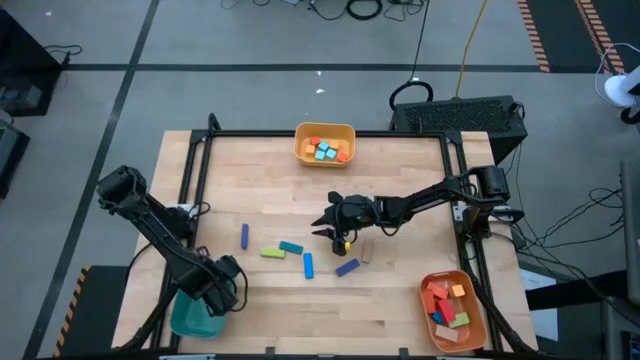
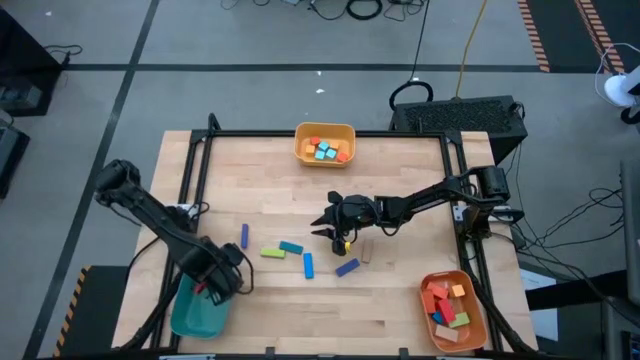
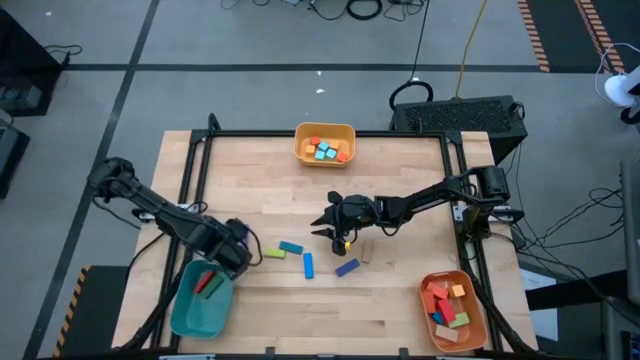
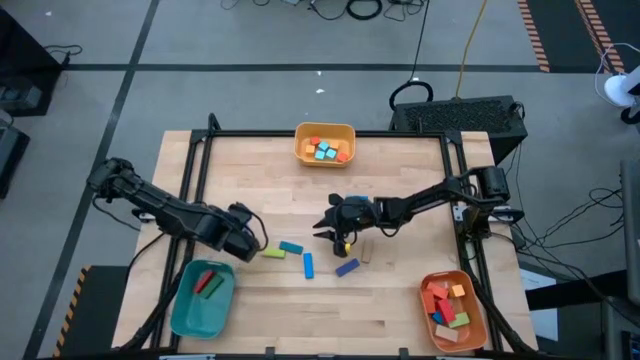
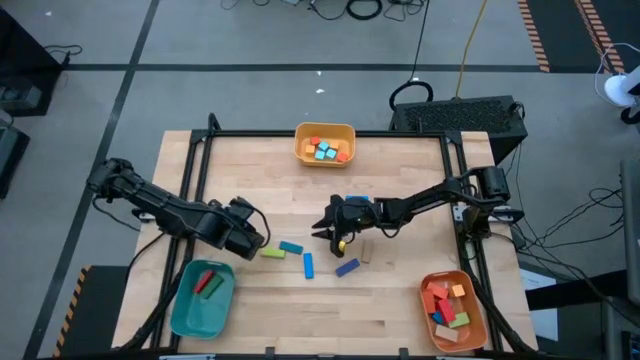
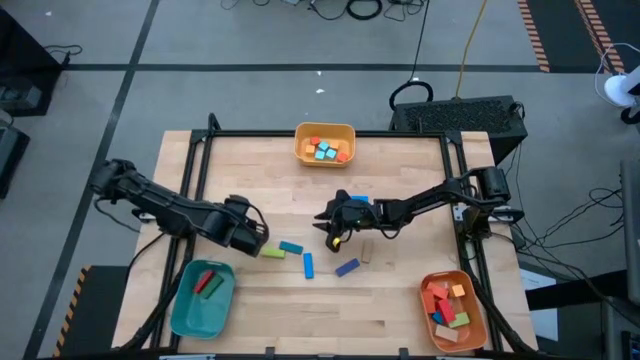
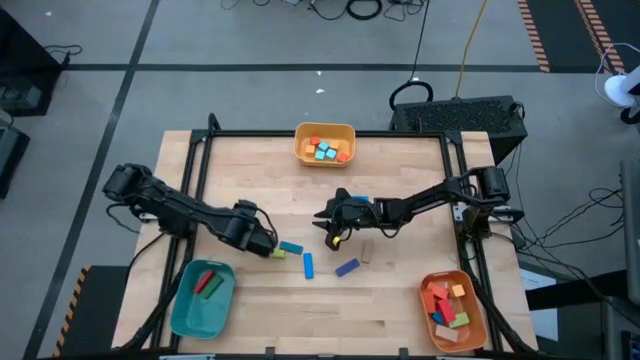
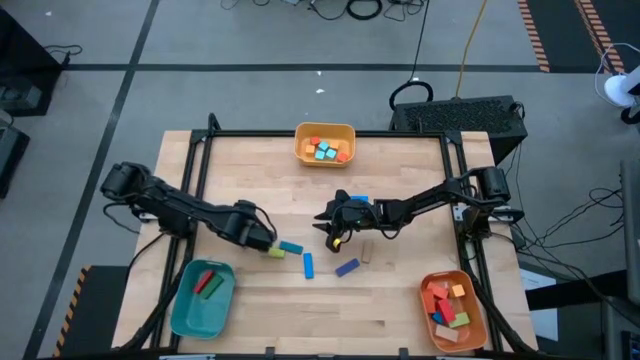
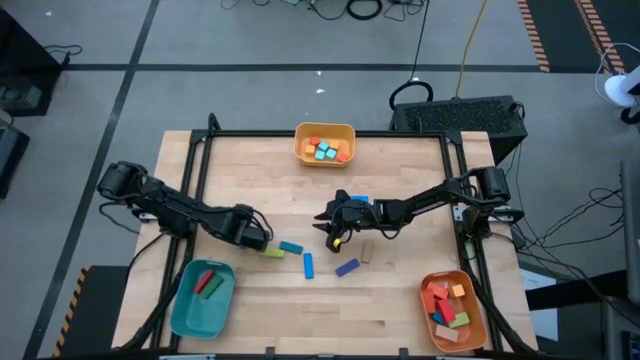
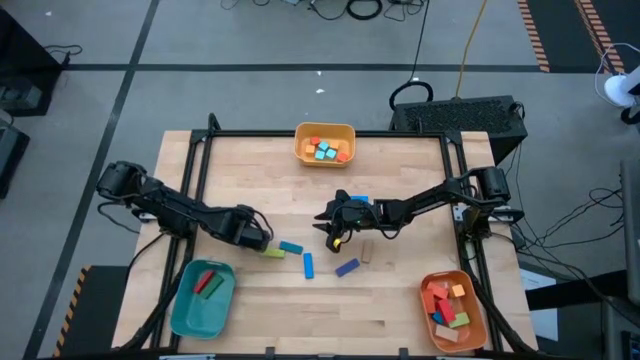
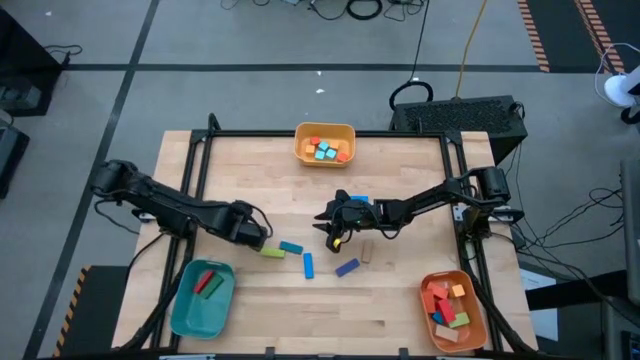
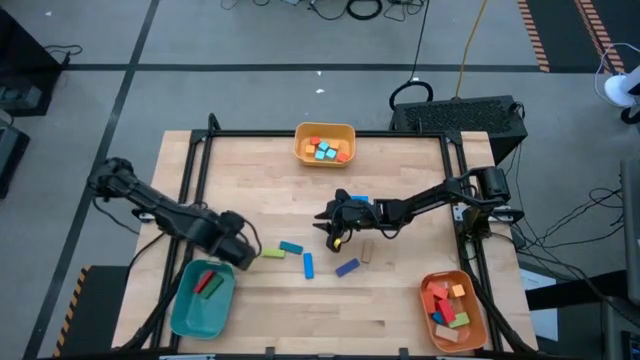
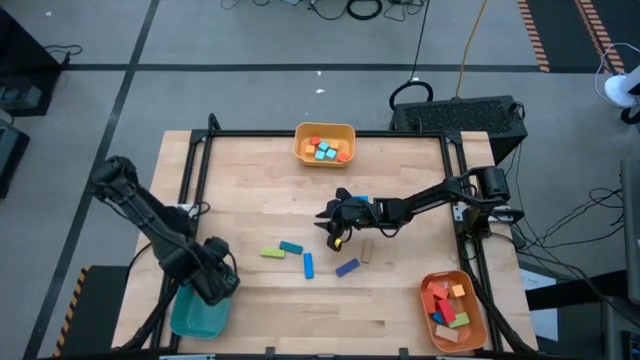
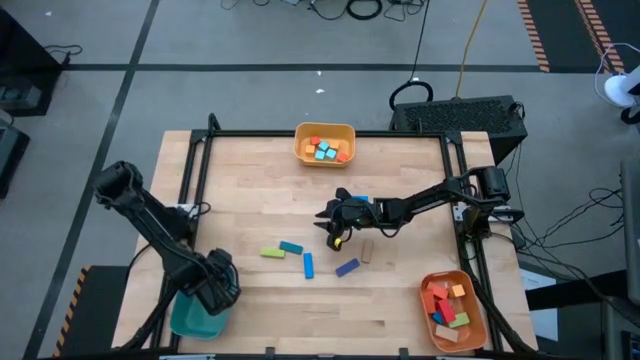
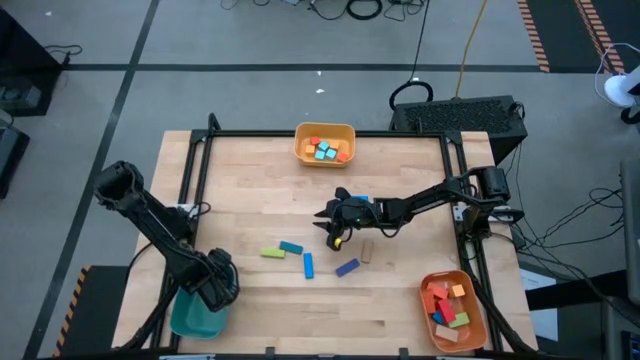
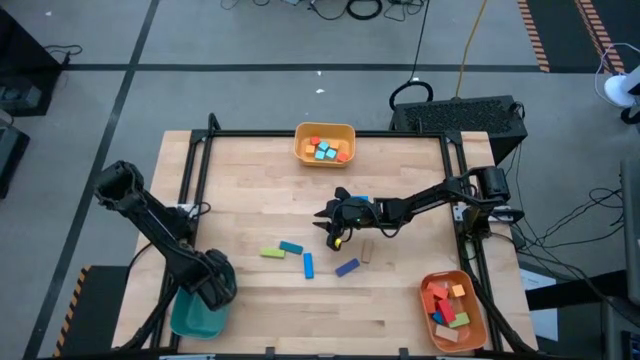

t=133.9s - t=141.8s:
Task: Sort blocks by size
Put the left small violet rectangle block into the green bin

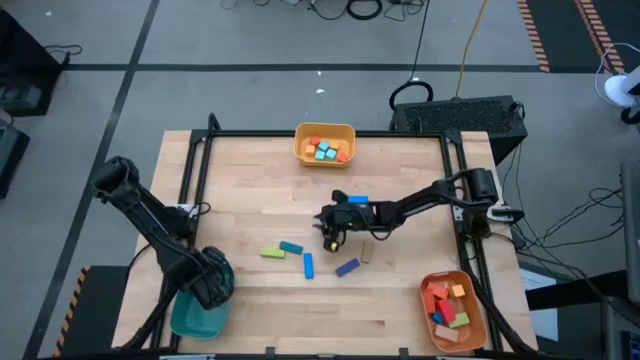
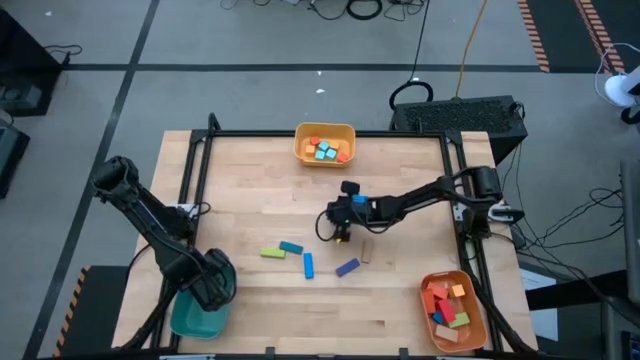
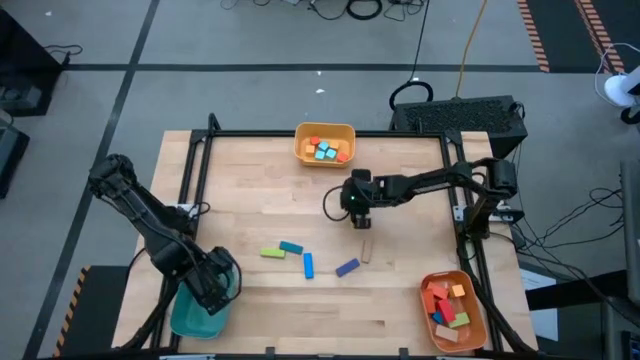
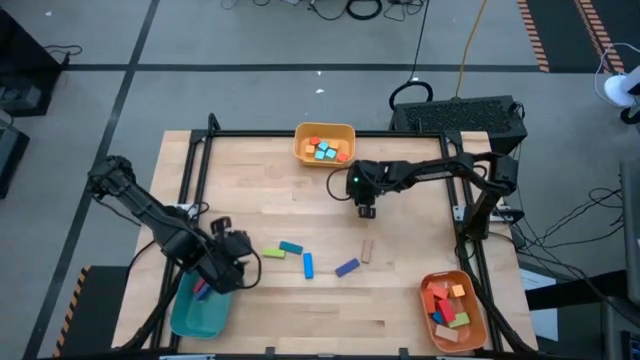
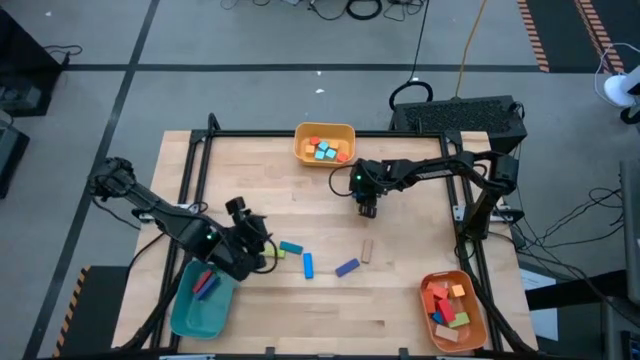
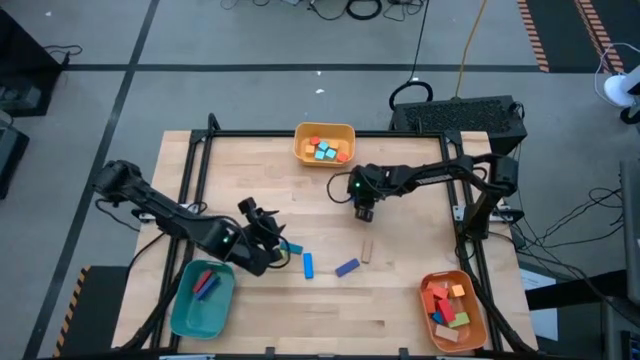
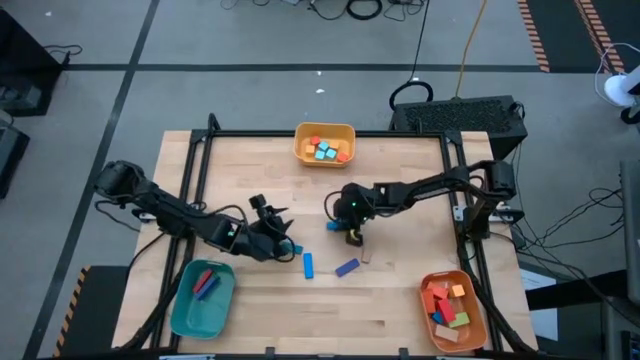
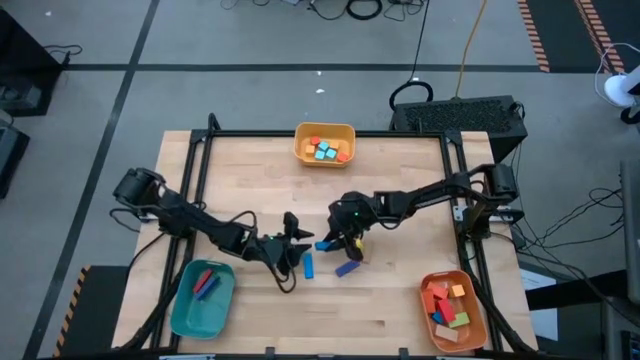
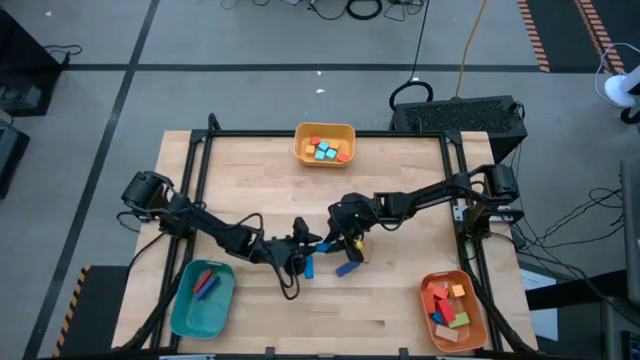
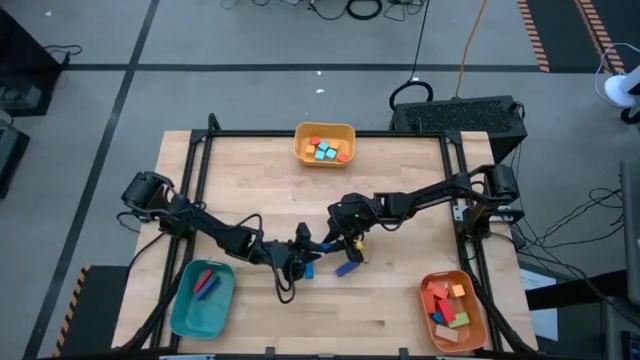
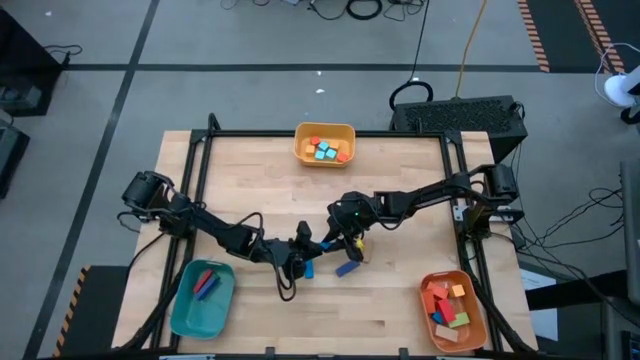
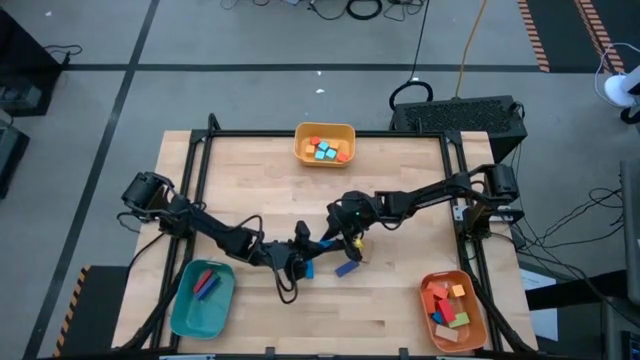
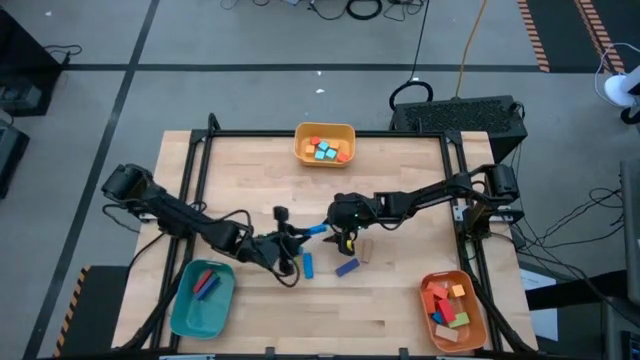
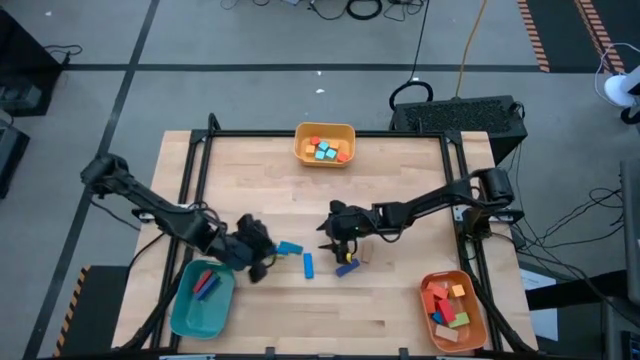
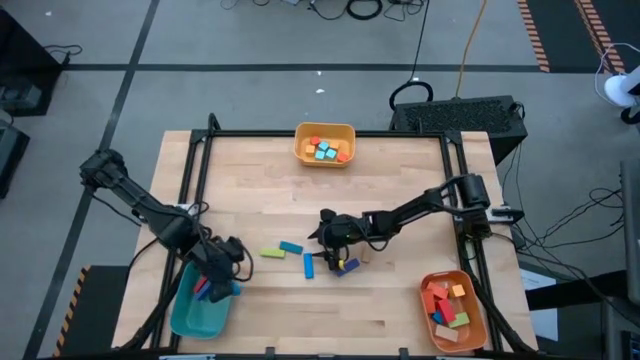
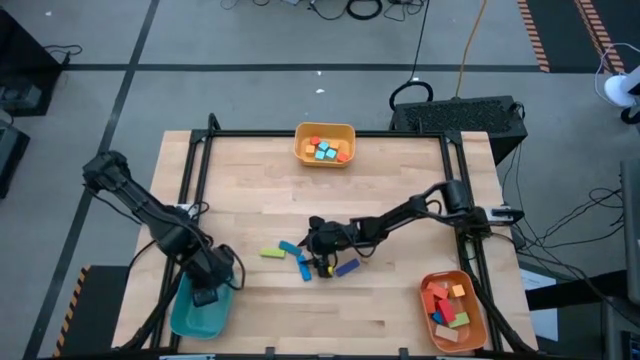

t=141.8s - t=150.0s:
Put the top small blue rectangle block into the green bin

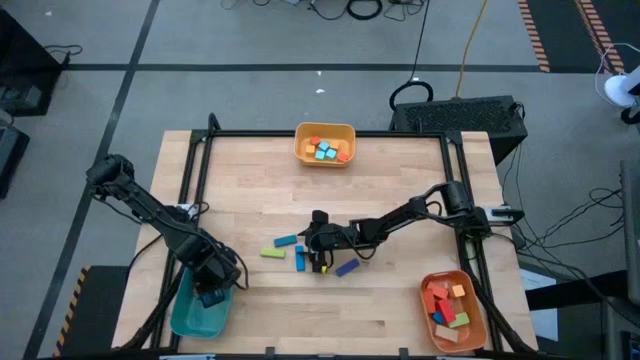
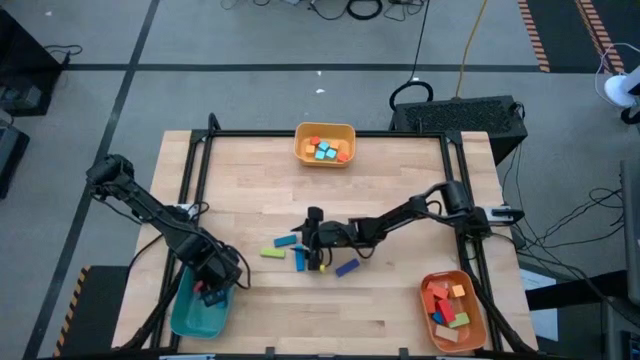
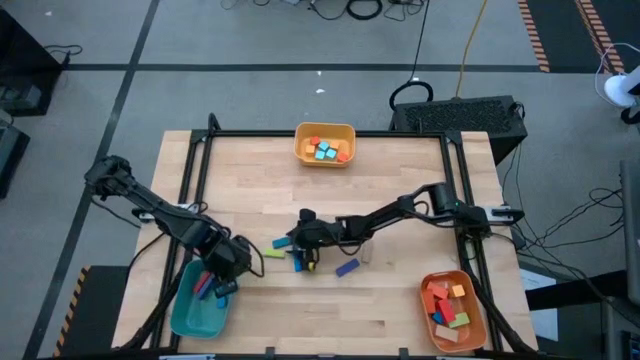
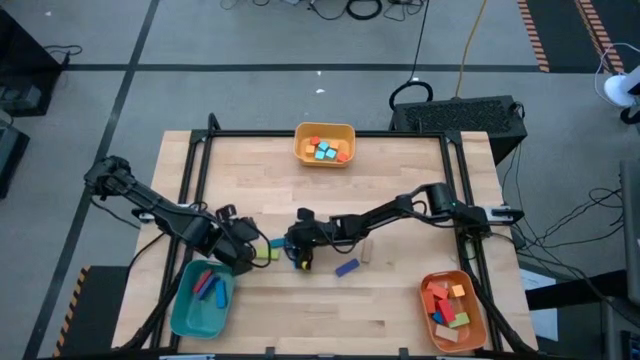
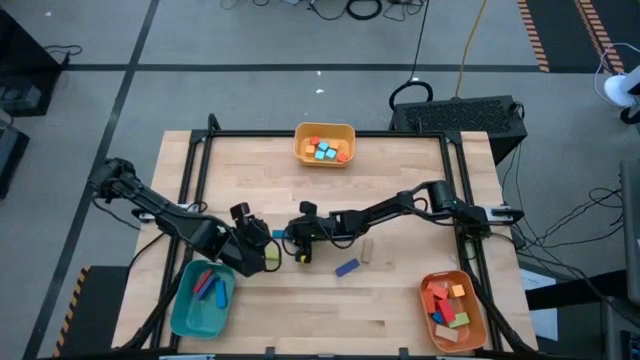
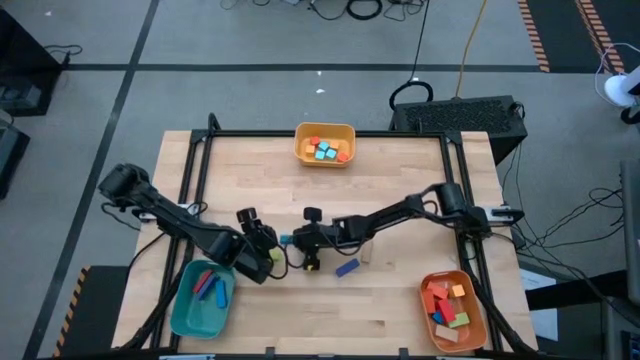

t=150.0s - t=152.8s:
Put the small dark blue rectangle block into the green bin

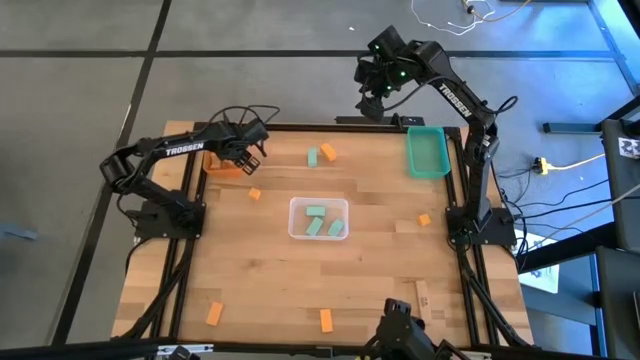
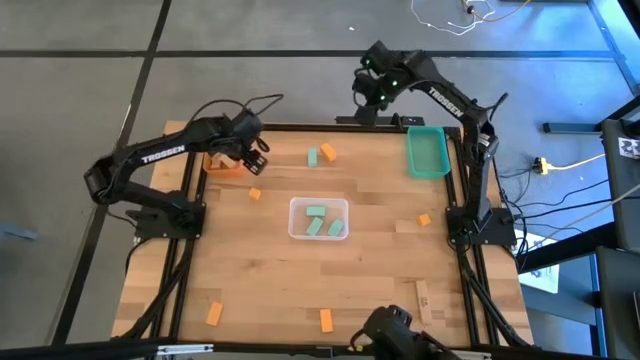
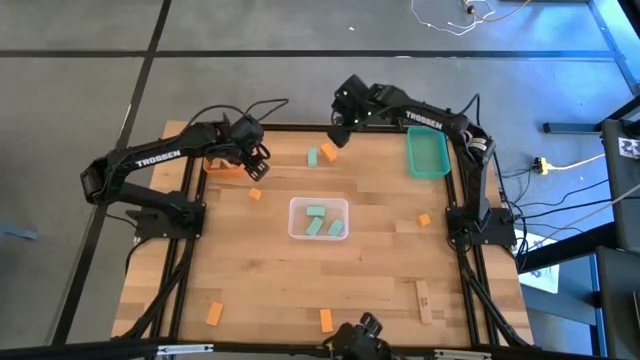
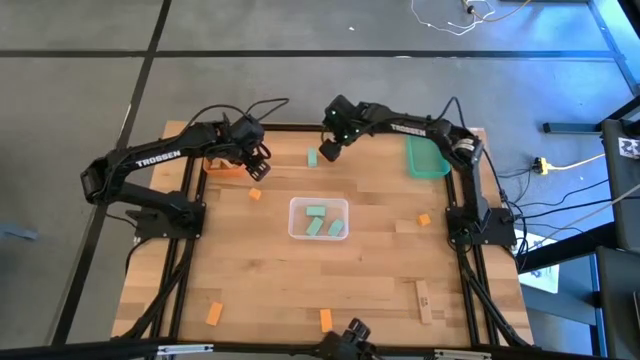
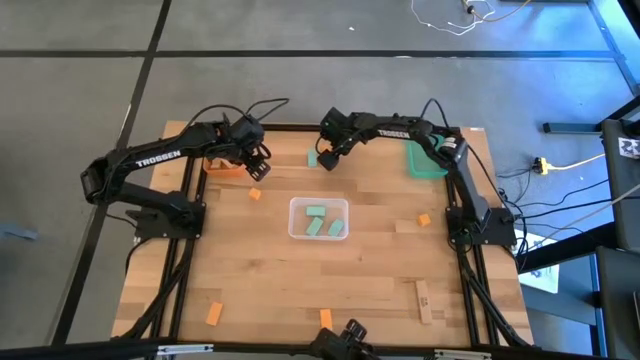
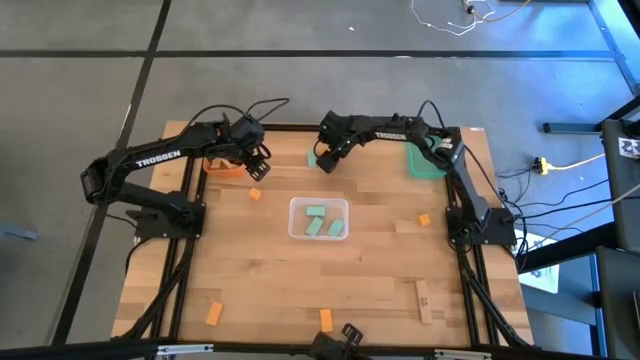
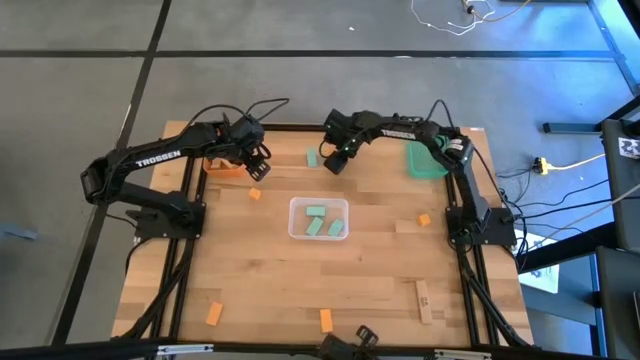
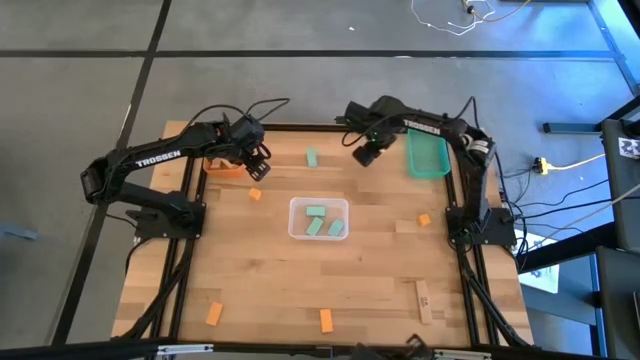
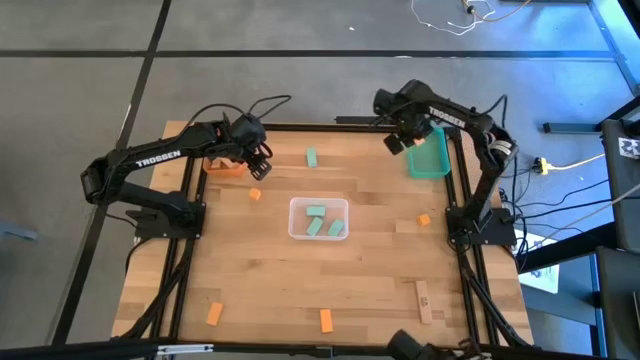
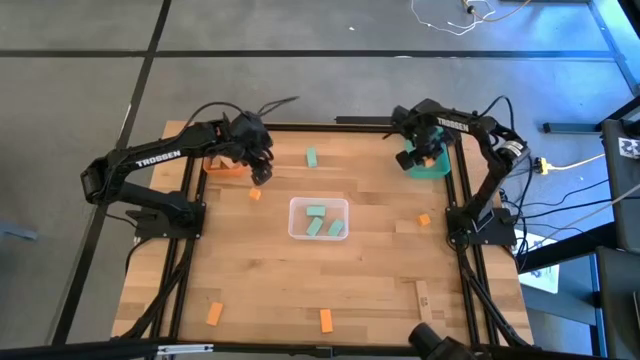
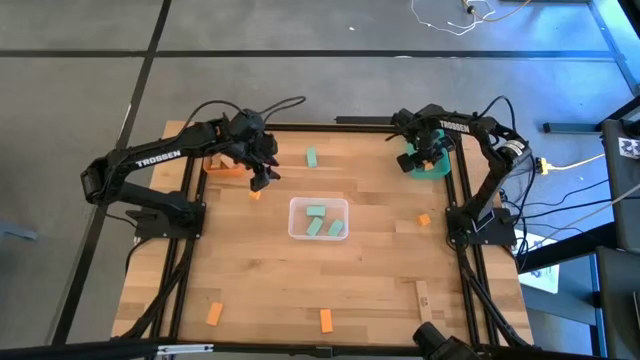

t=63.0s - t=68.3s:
Task: Sort & place blocks by color
Put the yellow block into the blue bin
